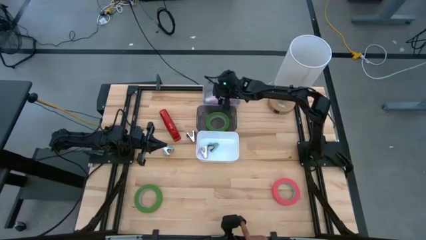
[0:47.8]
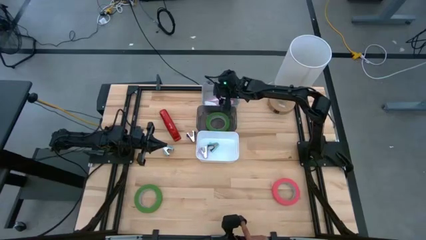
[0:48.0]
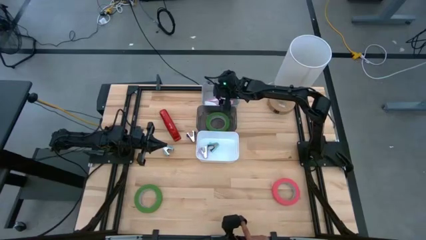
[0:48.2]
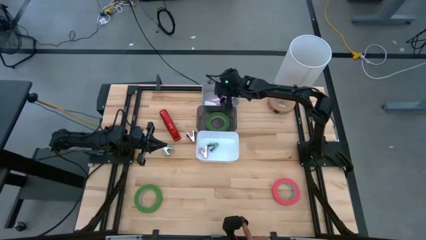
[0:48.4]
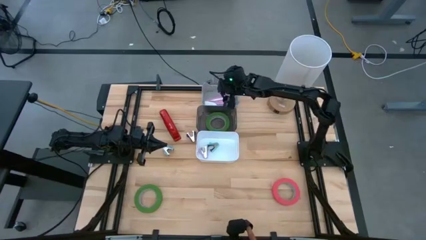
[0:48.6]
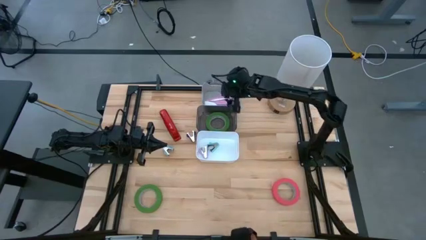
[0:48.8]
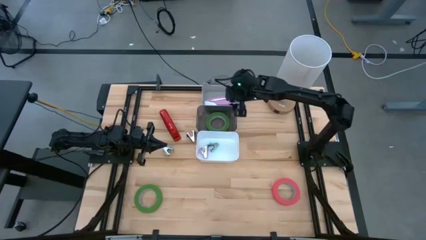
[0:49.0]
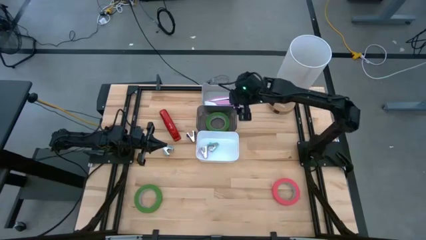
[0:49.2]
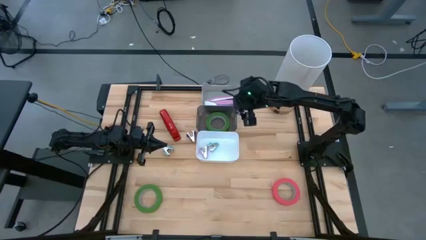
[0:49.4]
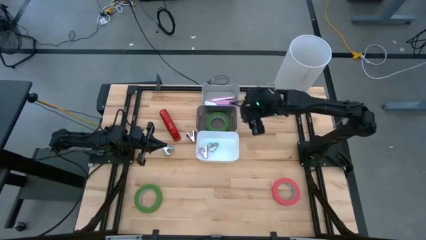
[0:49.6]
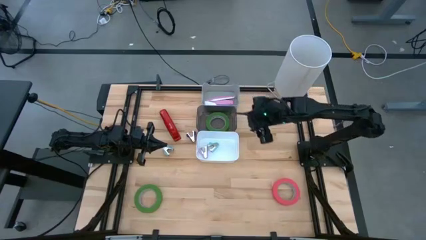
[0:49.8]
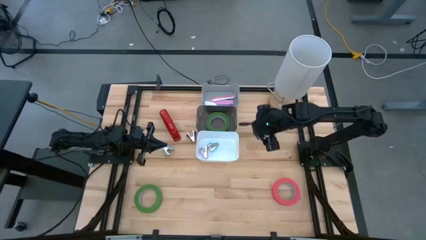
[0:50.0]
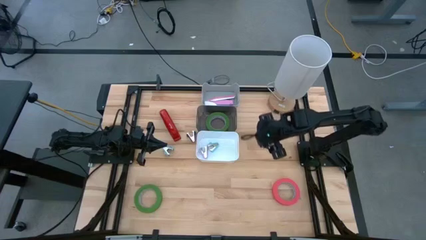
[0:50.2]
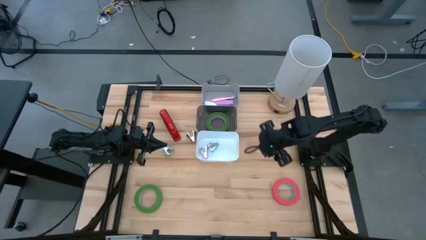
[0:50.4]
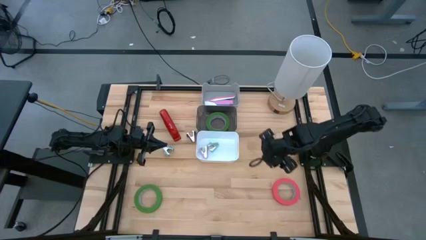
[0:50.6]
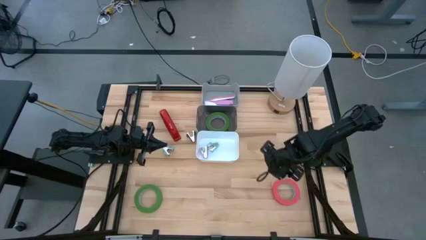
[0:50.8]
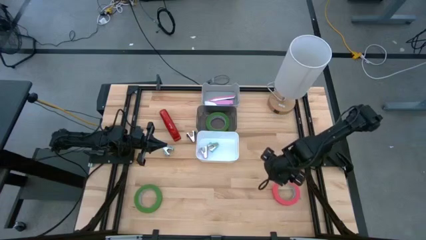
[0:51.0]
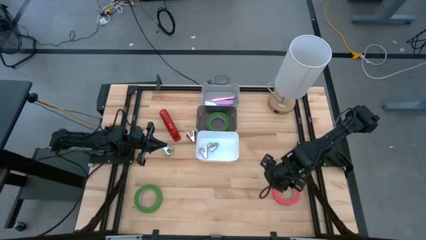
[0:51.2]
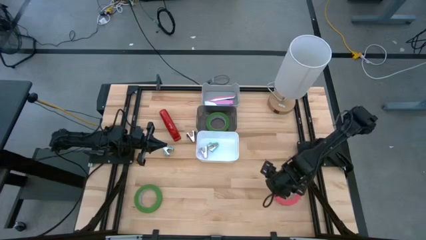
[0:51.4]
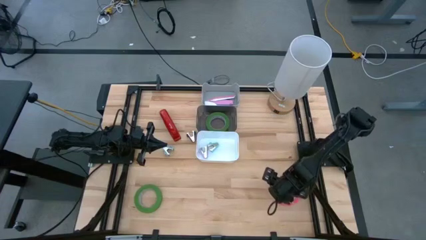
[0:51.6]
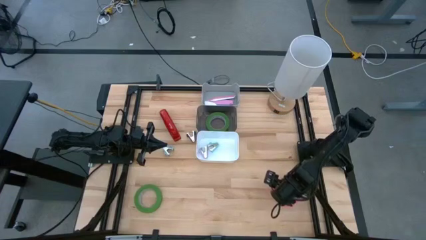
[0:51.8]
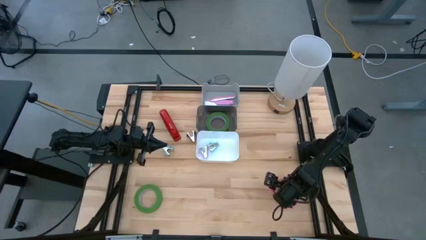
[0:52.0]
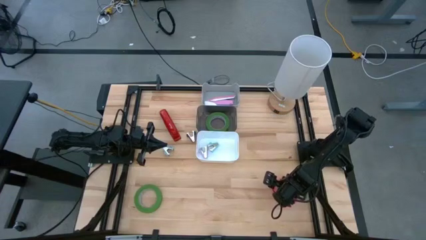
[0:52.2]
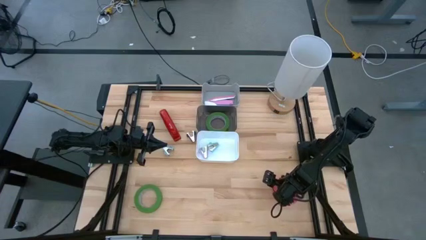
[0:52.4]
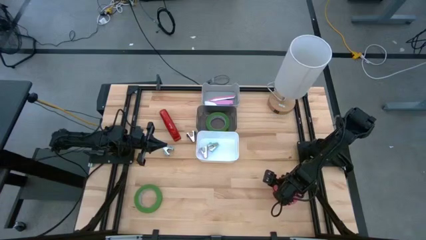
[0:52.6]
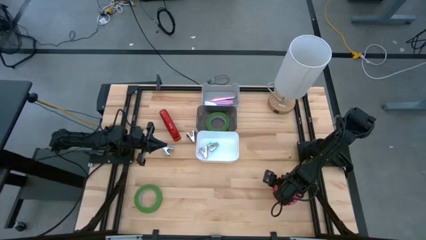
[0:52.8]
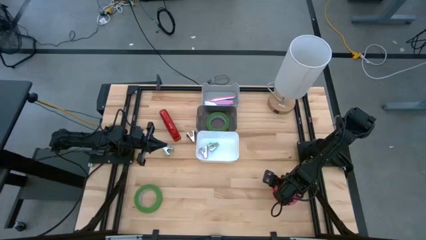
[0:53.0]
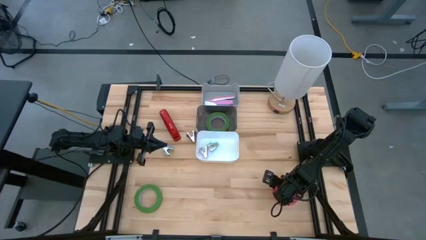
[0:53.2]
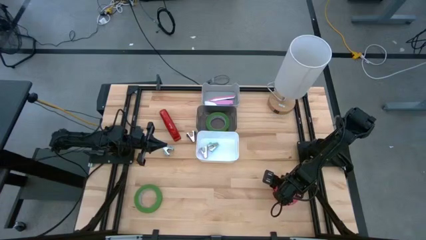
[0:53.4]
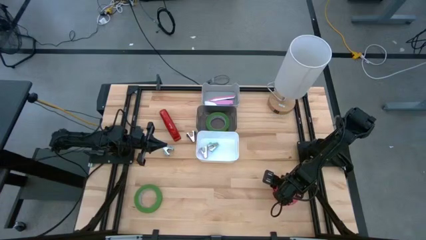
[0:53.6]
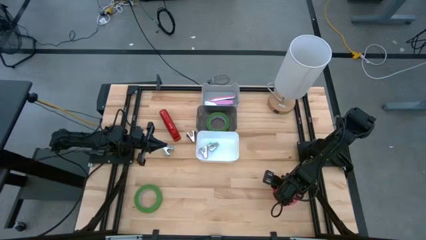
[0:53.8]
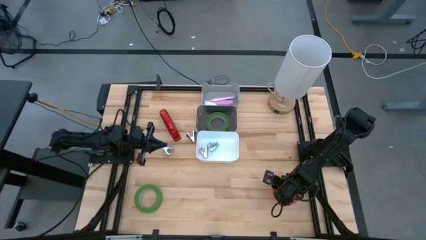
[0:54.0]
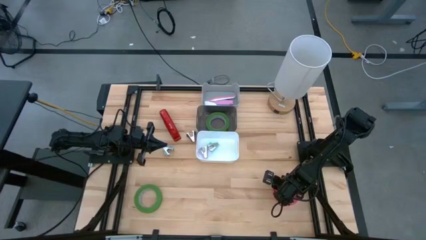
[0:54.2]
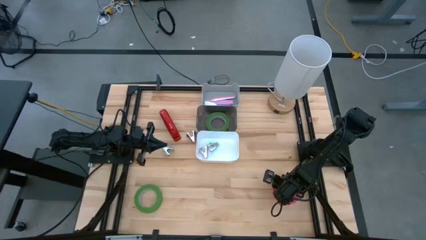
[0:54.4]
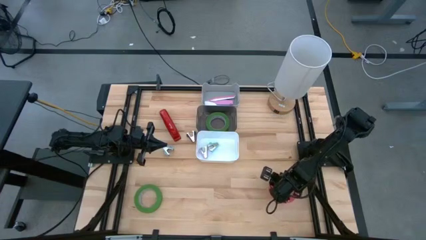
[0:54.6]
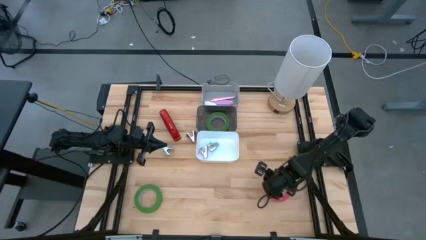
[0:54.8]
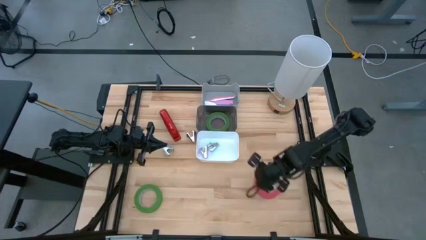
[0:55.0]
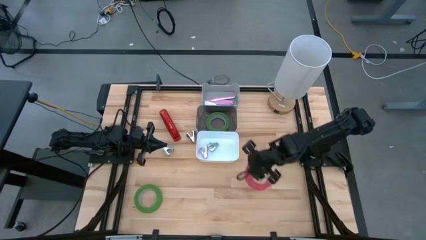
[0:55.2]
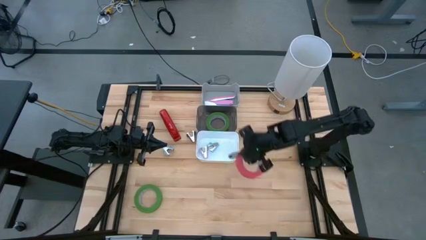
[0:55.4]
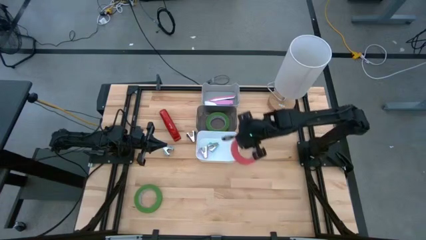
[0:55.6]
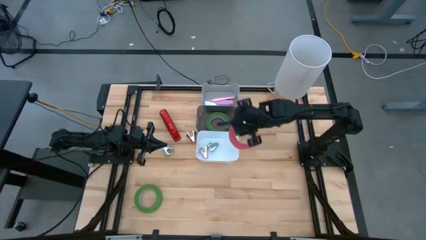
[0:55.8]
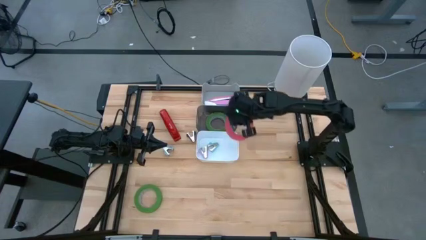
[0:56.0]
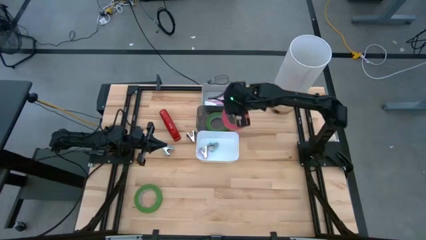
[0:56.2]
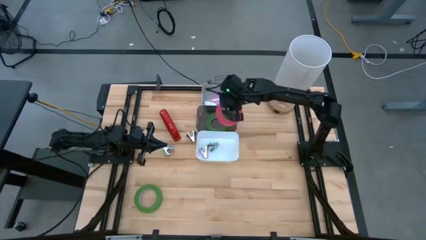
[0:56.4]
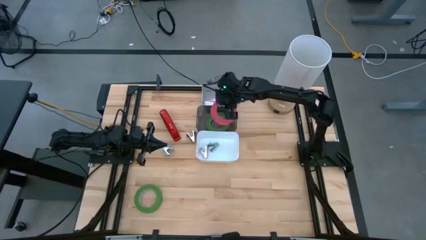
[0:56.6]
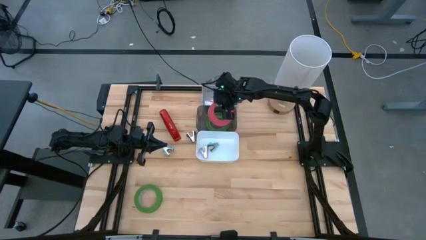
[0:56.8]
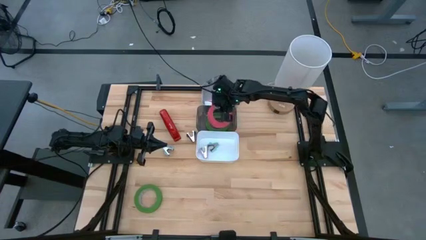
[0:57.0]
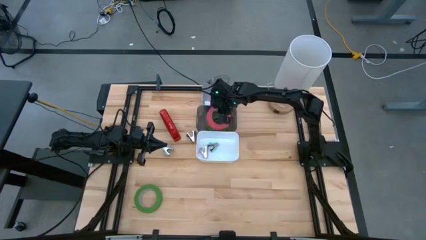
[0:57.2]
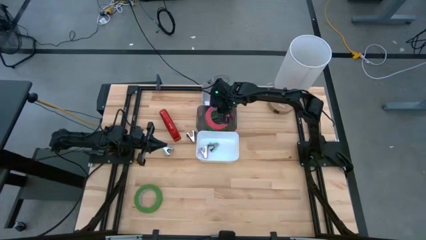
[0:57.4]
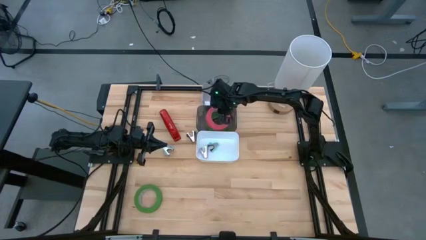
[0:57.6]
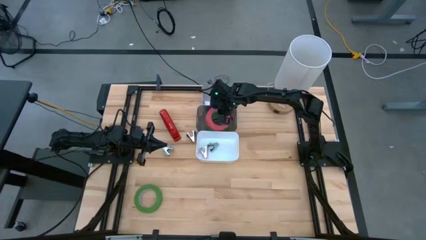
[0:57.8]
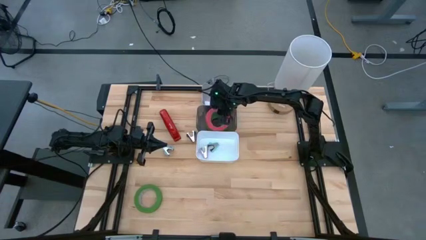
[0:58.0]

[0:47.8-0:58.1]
Task: Pick and place Stapler, Stapler remover, tape
Put the pink tape in the black bin
